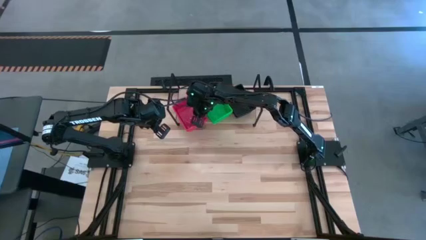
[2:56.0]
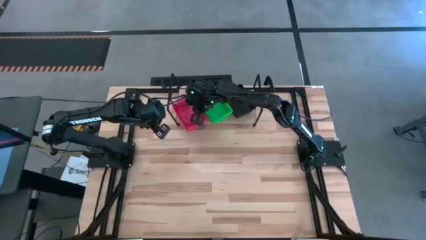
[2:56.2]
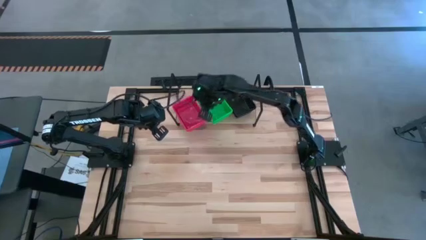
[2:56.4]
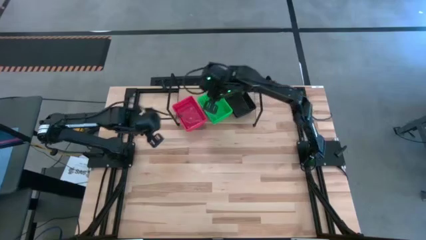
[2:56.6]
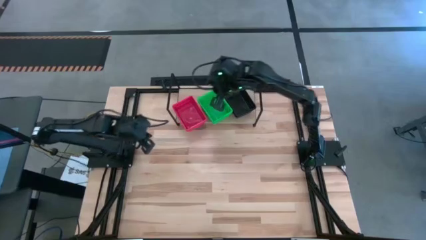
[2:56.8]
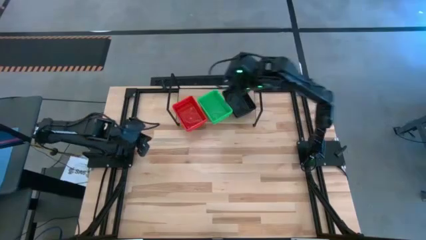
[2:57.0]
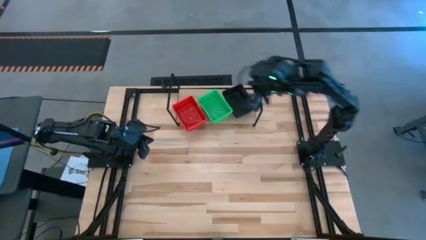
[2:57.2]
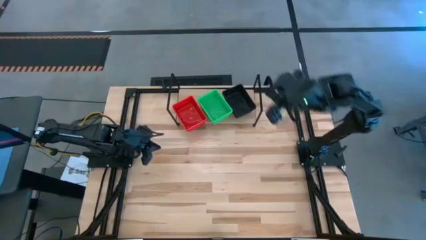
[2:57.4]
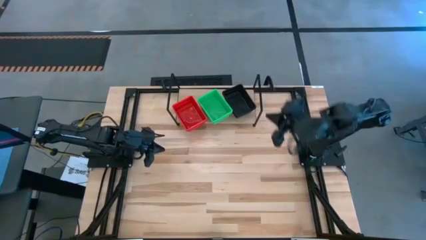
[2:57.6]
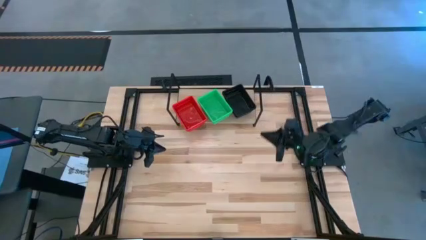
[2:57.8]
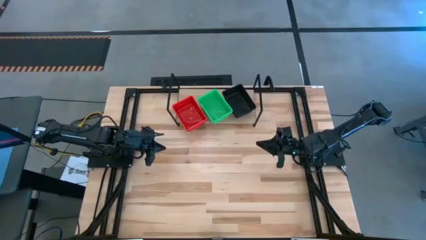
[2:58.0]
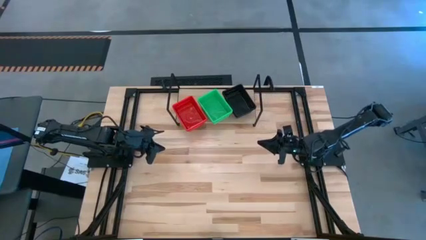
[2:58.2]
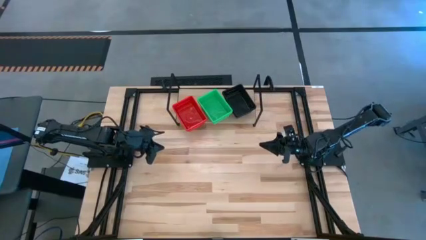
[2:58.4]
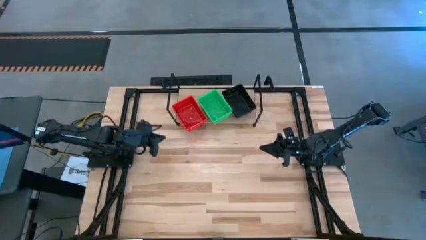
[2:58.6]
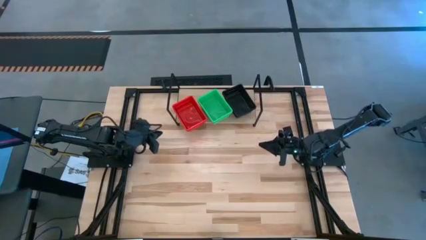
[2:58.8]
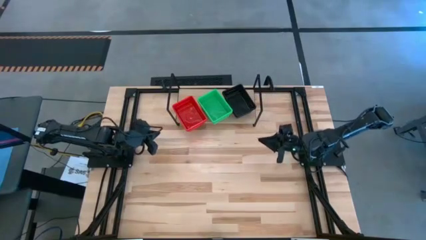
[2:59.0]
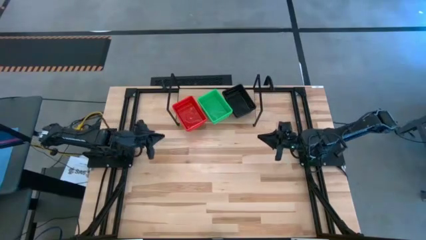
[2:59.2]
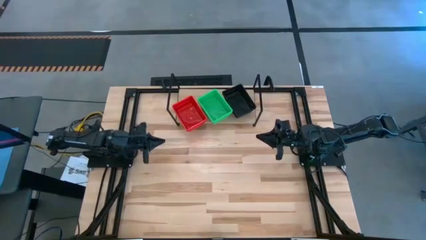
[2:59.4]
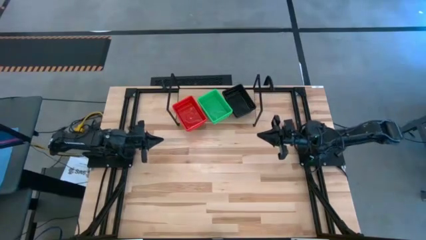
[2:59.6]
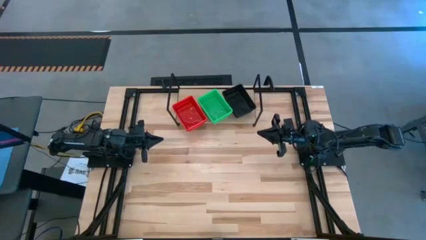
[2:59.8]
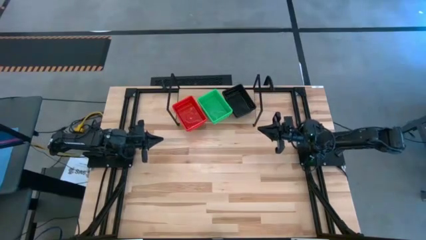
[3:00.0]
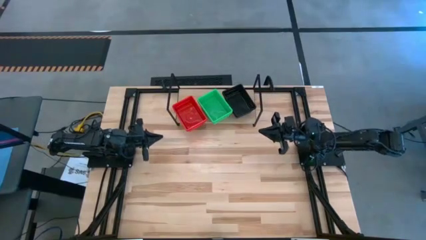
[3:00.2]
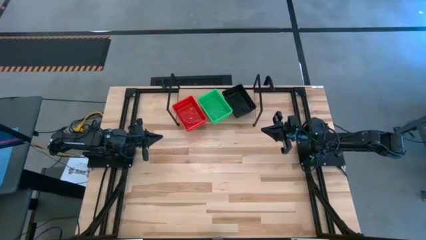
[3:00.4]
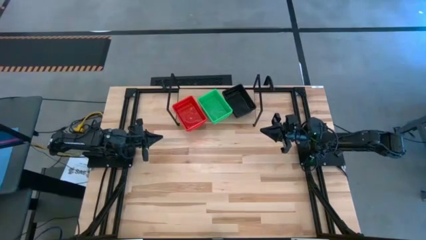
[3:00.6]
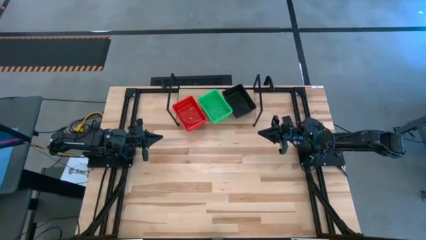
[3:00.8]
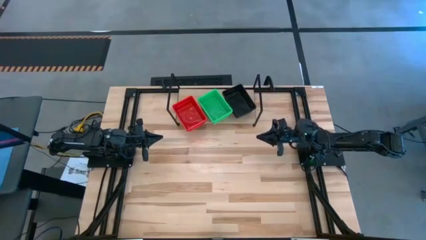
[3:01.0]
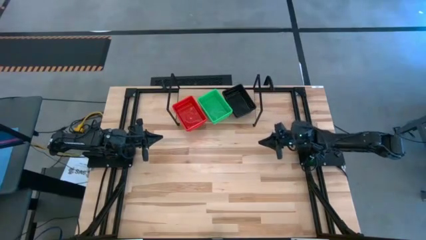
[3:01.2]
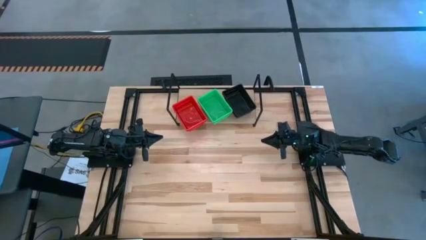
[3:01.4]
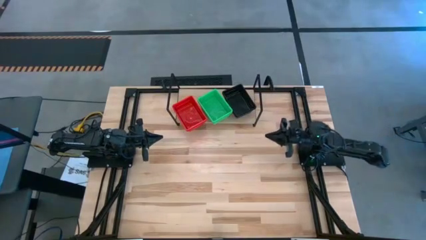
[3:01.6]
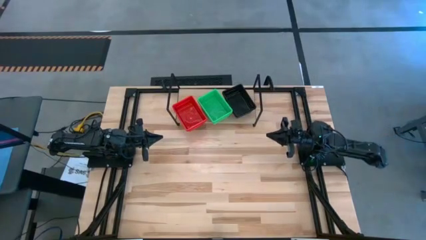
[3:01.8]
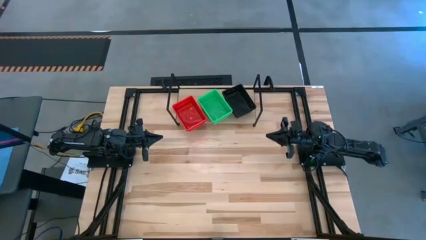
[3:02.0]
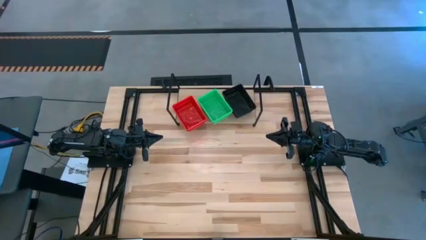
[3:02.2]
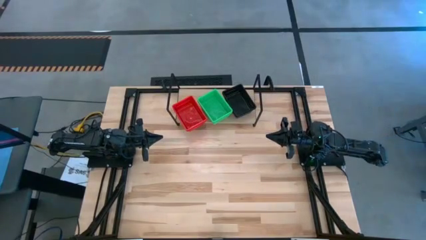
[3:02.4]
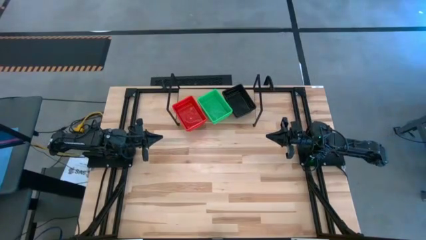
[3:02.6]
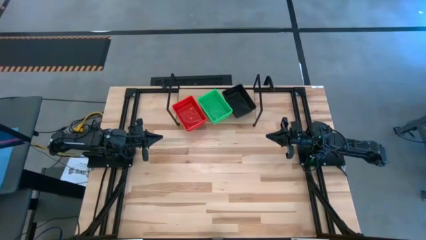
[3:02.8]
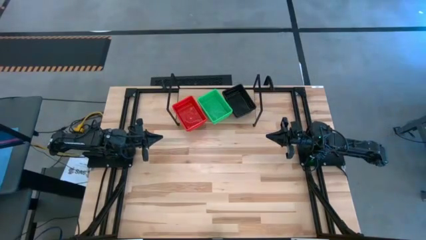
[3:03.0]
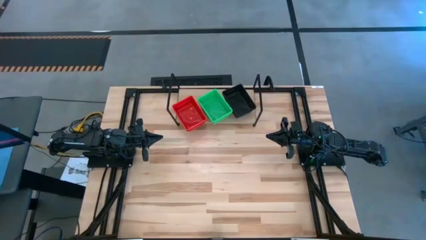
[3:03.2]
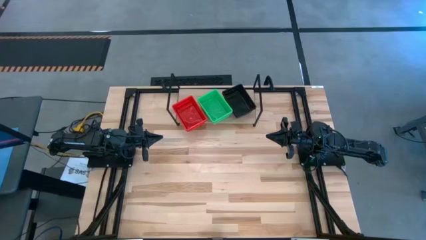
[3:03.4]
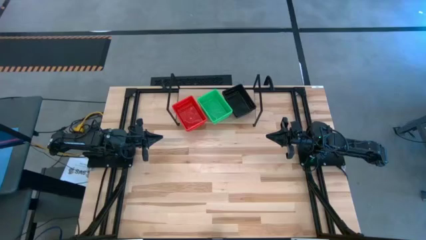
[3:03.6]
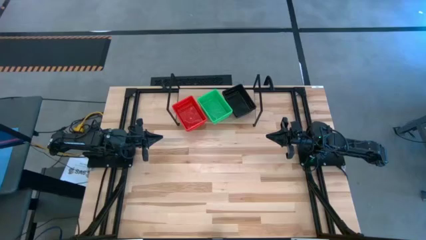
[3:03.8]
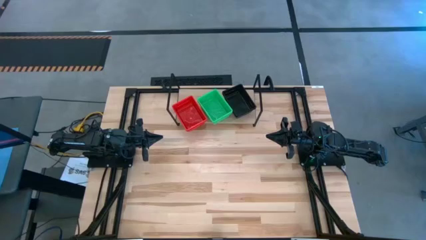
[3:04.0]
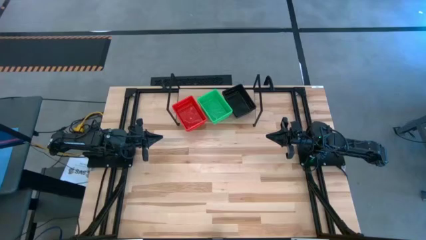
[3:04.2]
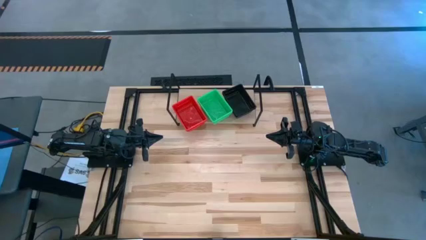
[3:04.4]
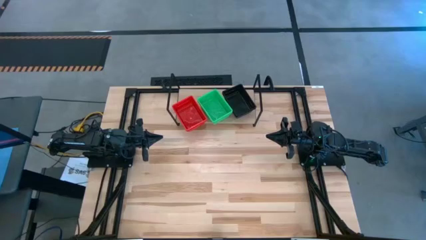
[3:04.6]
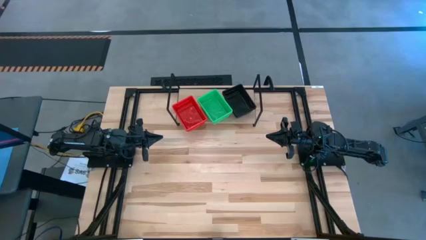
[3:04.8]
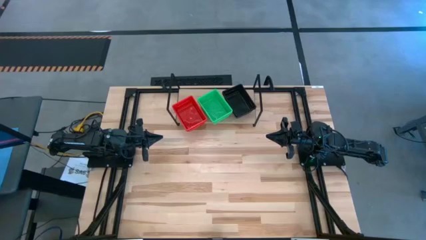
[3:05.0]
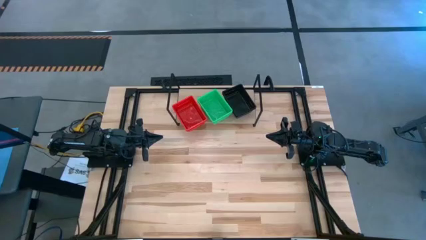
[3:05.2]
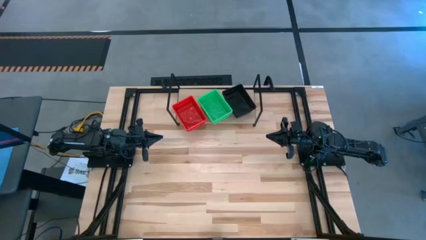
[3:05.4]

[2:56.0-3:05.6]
Task: Stack baskets on shelf by color
Return to Home Position

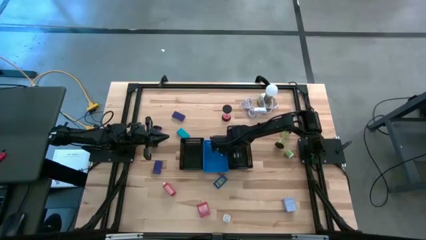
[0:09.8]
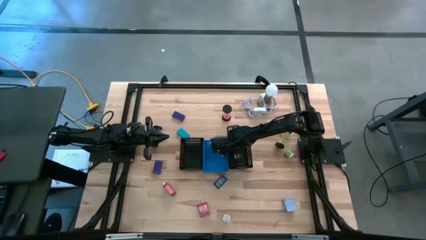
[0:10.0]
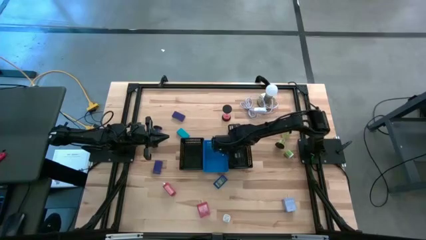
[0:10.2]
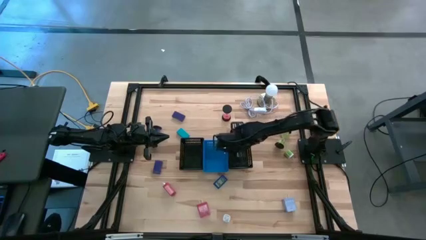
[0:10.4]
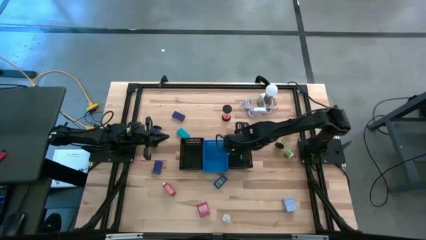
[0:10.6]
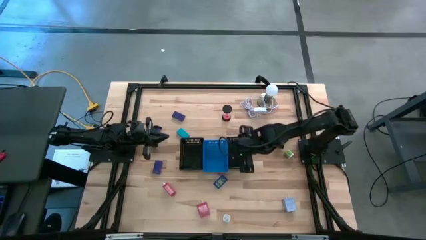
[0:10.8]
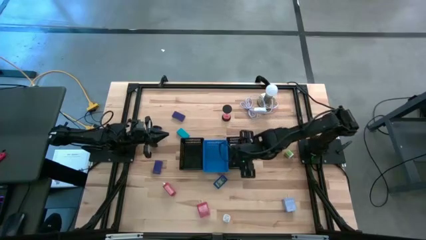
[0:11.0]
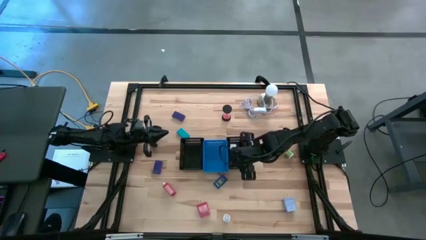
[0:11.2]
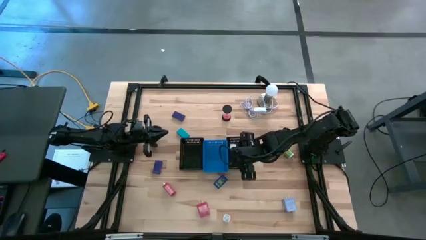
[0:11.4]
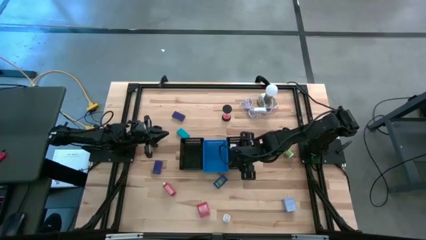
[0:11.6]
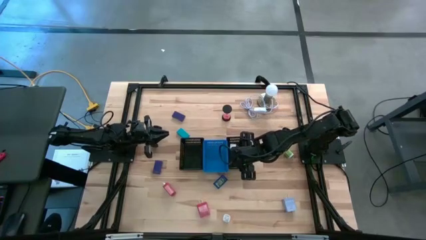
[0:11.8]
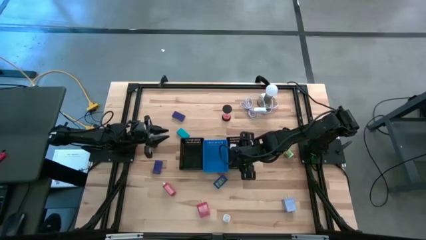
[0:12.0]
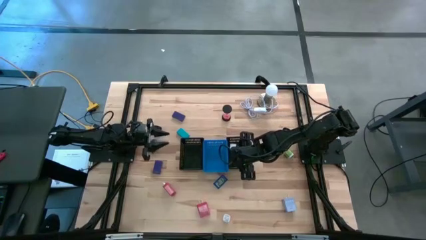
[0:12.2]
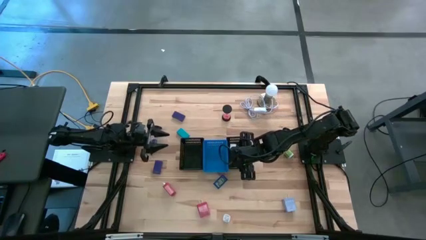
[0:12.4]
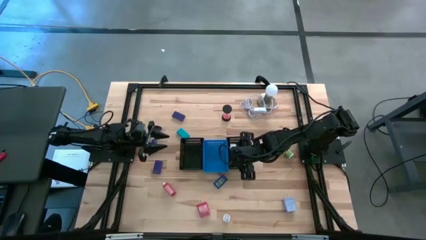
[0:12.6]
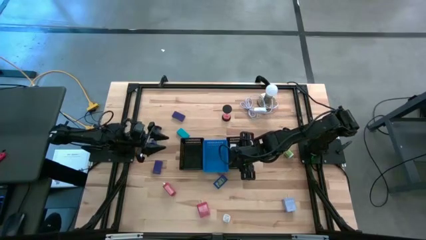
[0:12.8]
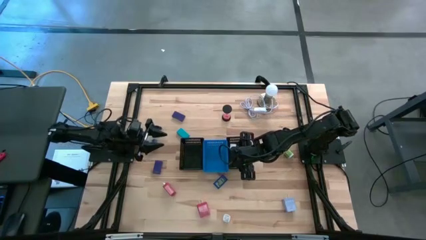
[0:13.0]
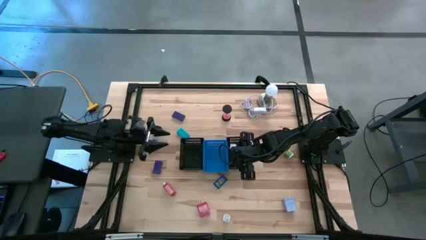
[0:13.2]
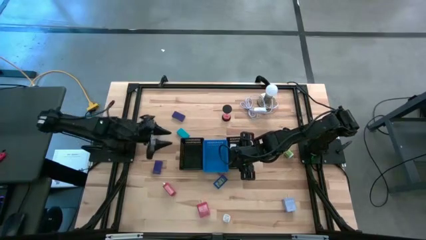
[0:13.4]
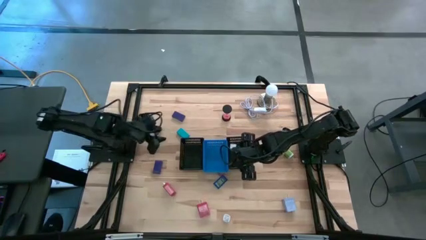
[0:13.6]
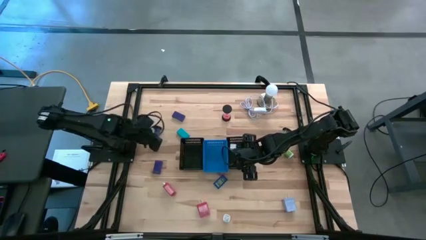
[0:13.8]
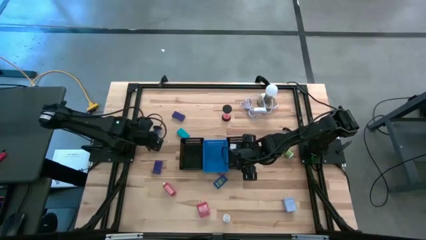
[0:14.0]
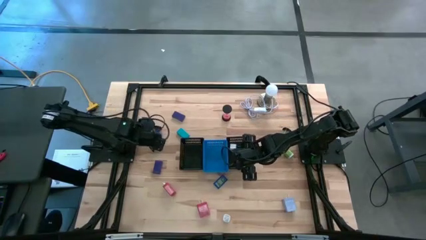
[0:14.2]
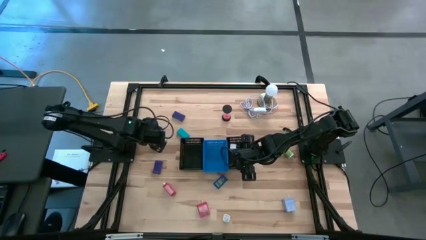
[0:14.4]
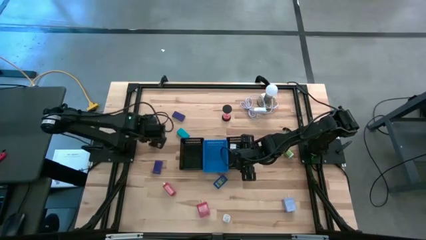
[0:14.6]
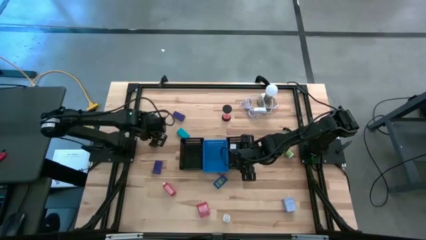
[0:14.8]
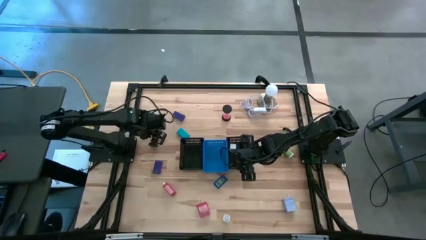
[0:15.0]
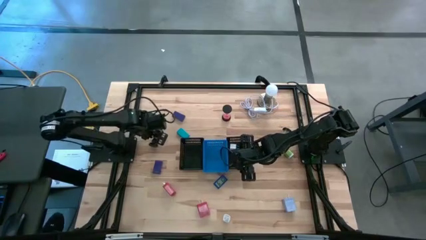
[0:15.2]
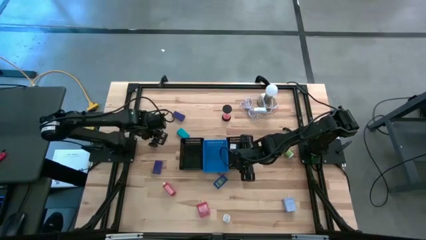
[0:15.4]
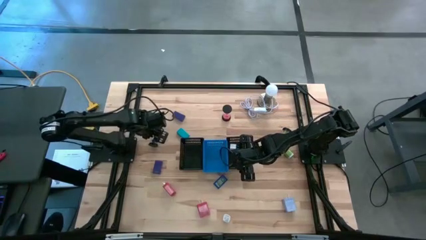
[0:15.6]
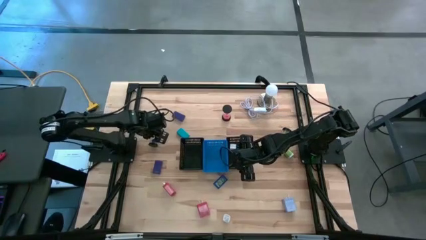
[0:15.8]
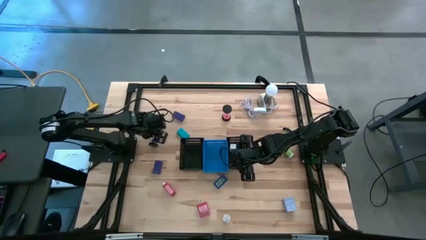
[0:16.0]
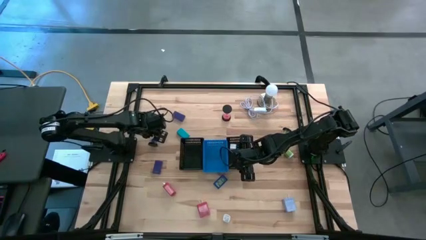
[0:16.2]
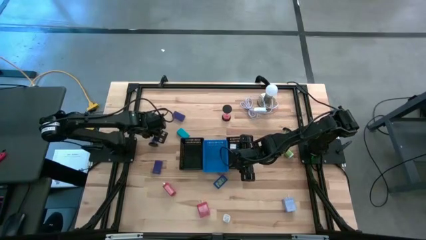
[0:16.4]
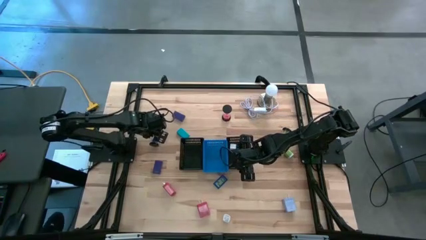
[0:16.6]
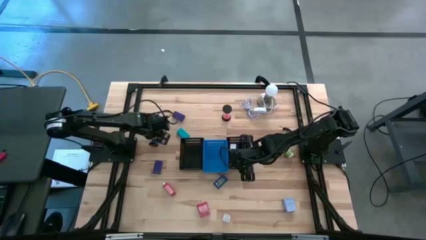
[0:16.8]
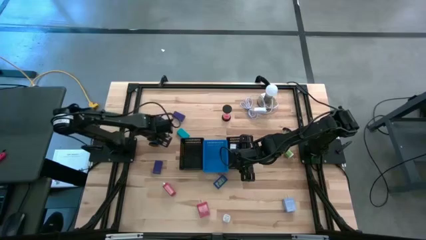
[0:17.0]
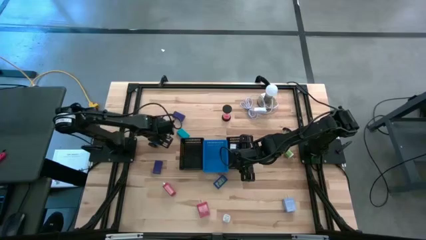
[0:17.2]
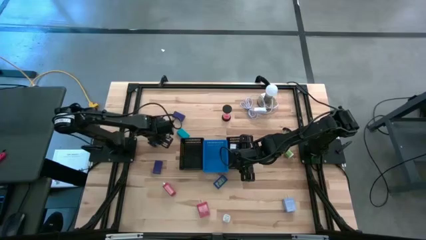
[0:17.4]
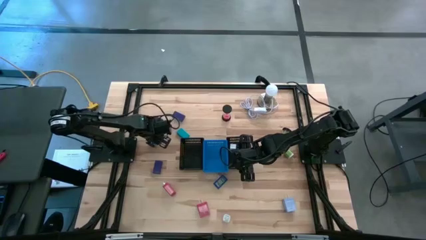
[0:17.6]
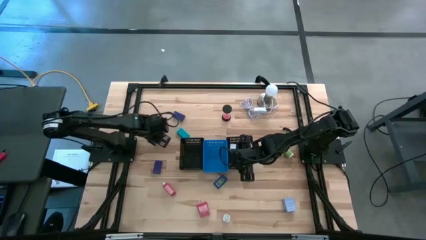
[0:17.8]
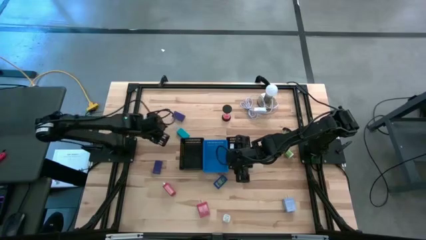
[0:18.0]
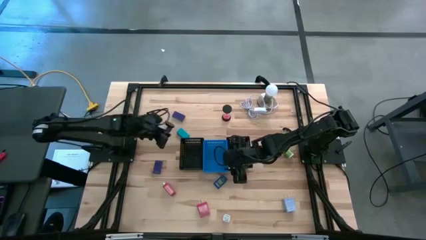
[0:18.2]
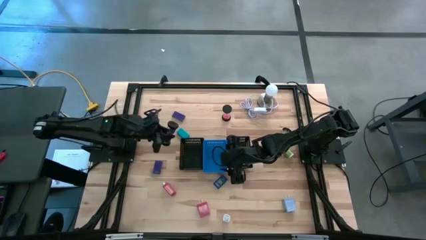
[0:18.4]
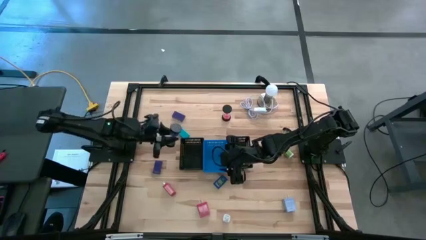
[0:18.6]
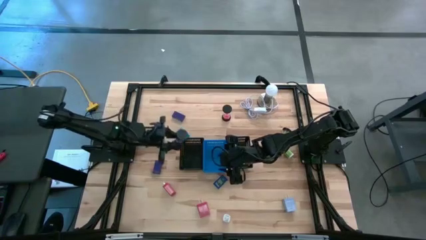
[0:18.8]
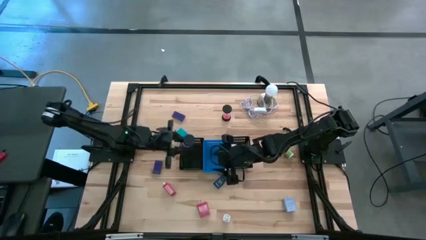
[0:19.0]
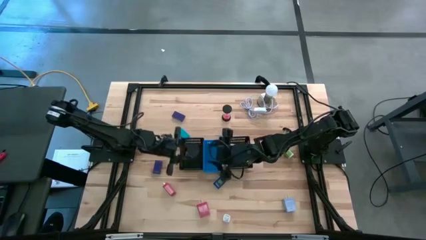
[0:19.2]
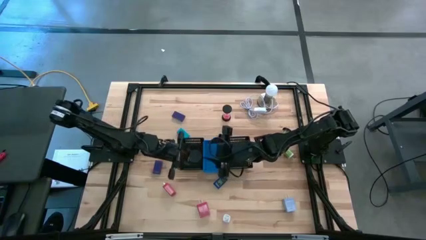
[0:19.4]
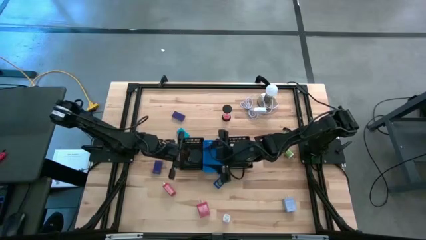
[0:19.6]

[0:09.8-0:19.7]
Task: Pick & Place Office items
Put the blue hourglass into the blue bin
